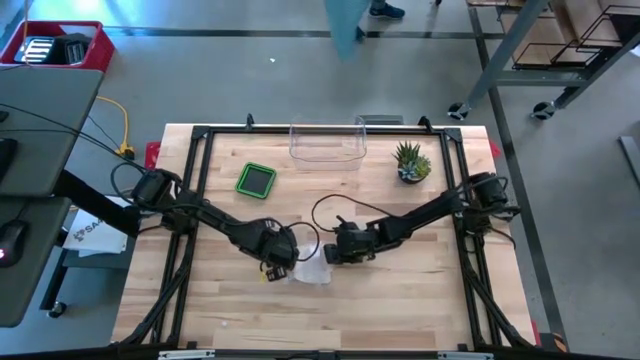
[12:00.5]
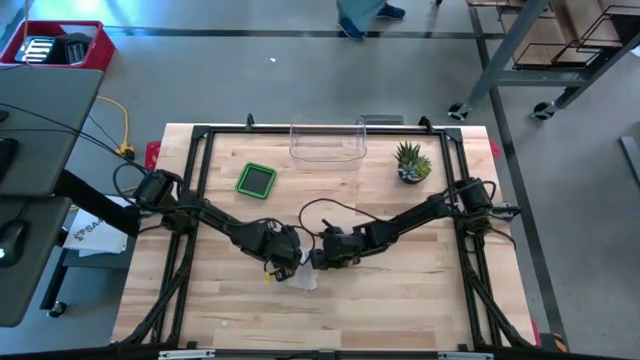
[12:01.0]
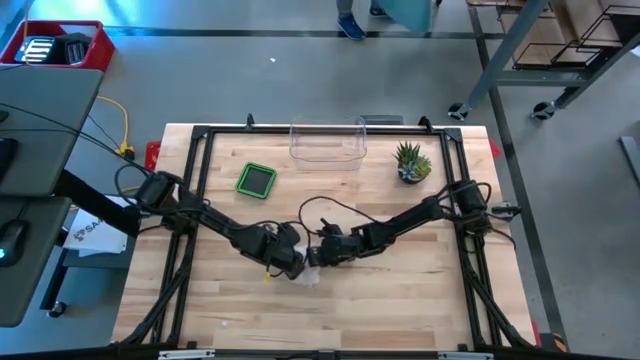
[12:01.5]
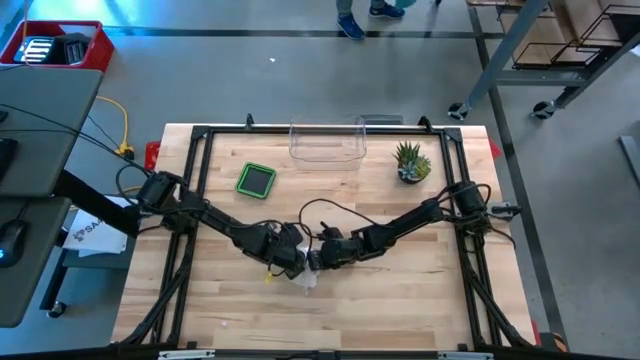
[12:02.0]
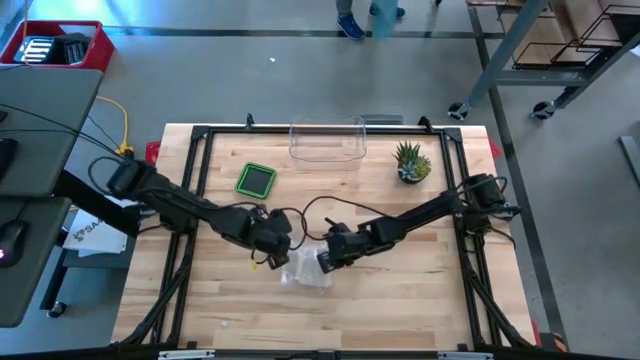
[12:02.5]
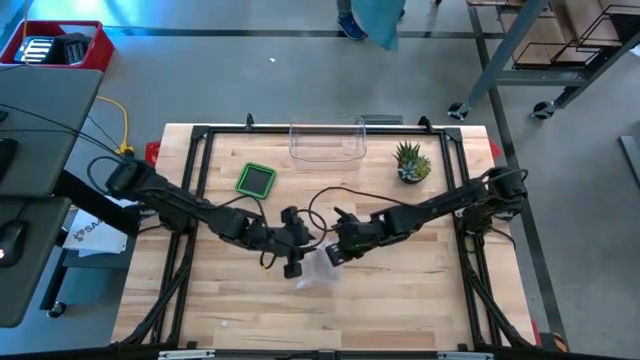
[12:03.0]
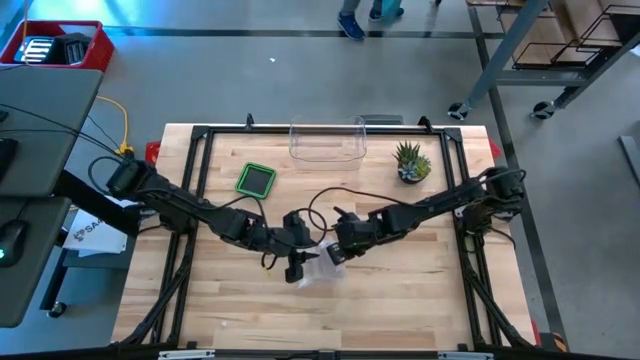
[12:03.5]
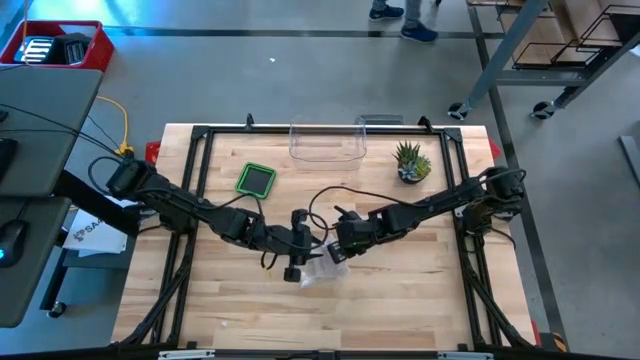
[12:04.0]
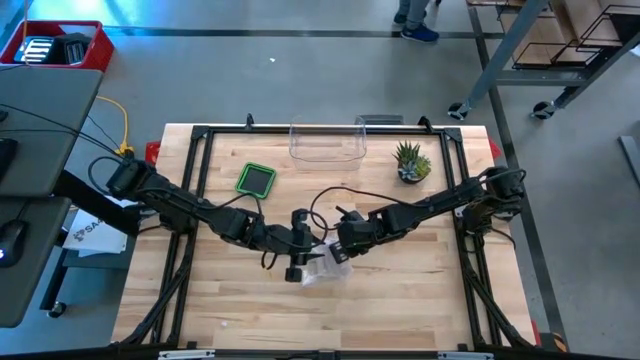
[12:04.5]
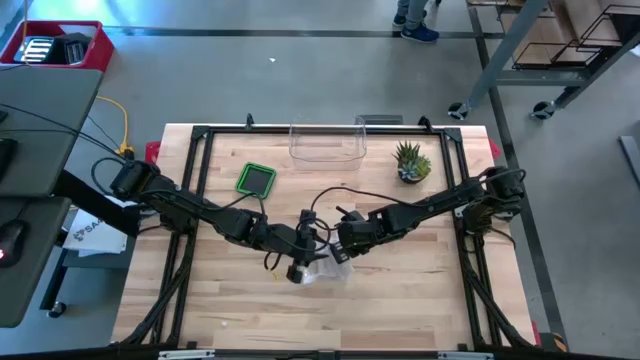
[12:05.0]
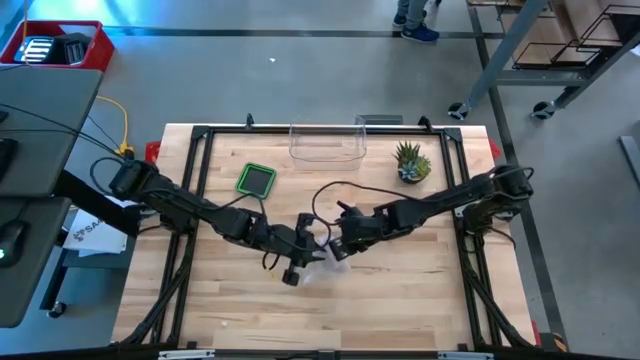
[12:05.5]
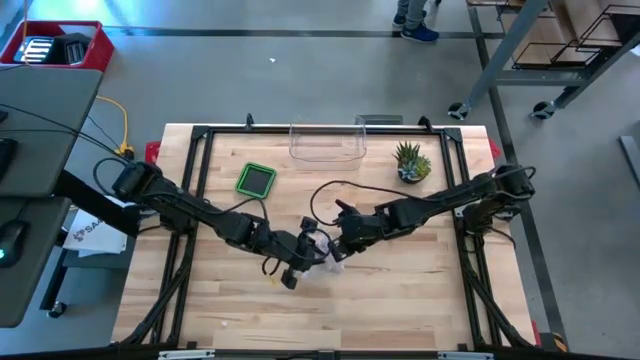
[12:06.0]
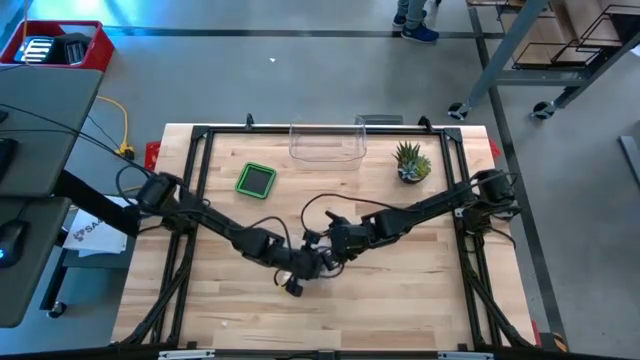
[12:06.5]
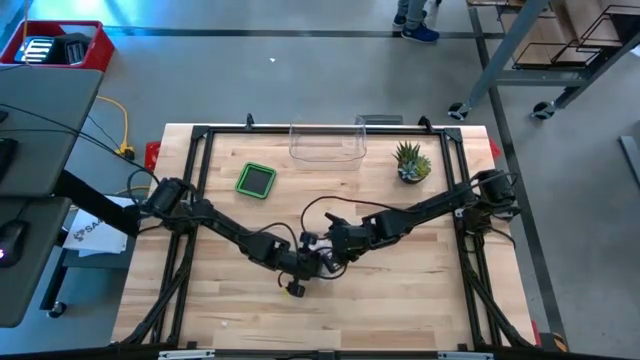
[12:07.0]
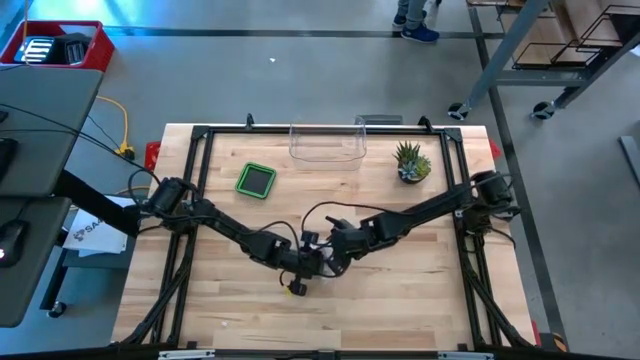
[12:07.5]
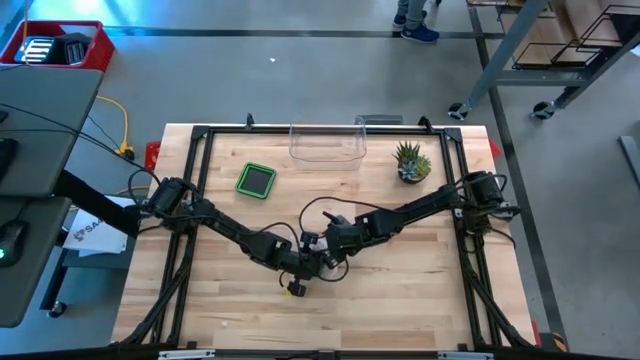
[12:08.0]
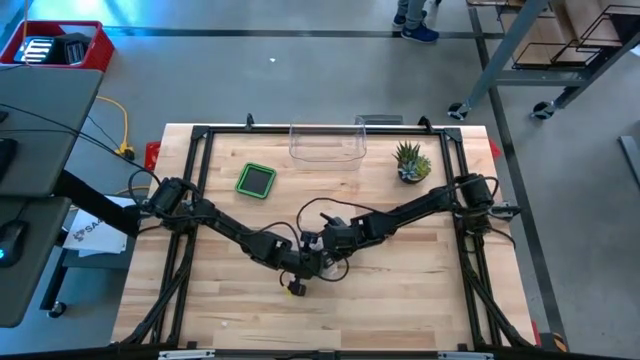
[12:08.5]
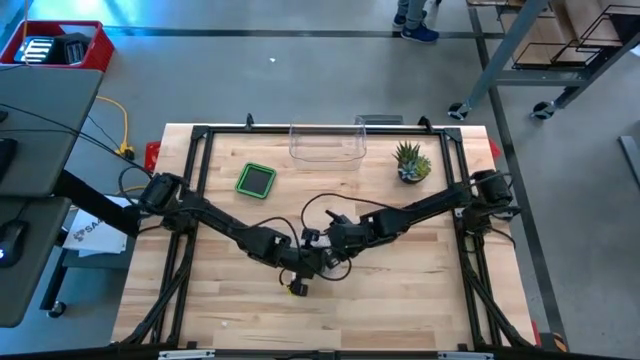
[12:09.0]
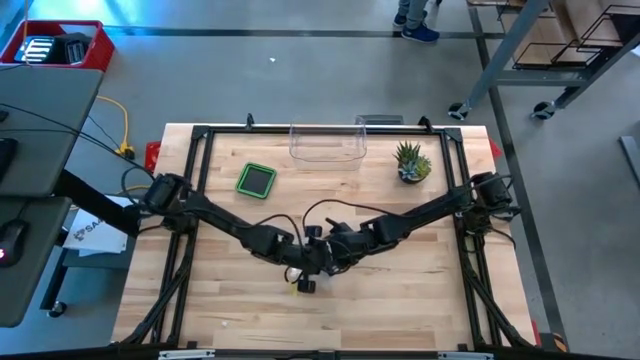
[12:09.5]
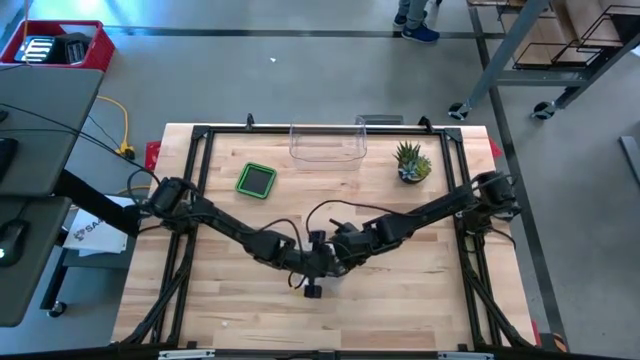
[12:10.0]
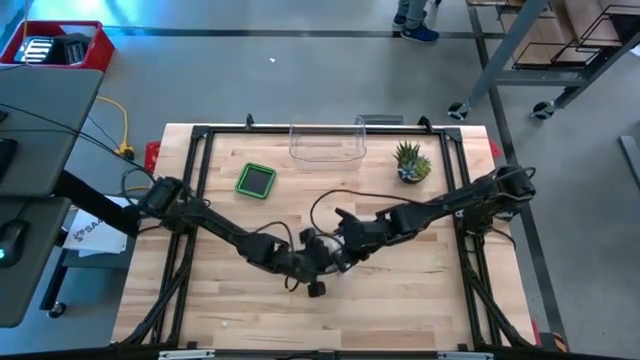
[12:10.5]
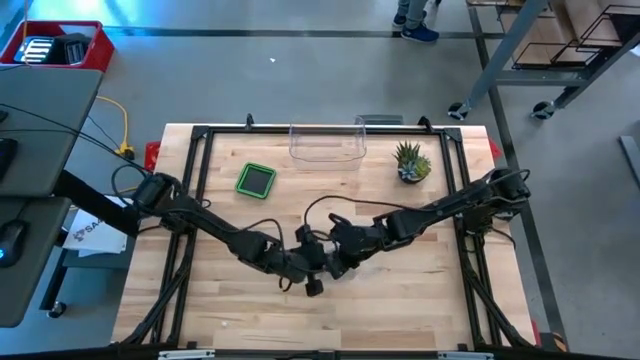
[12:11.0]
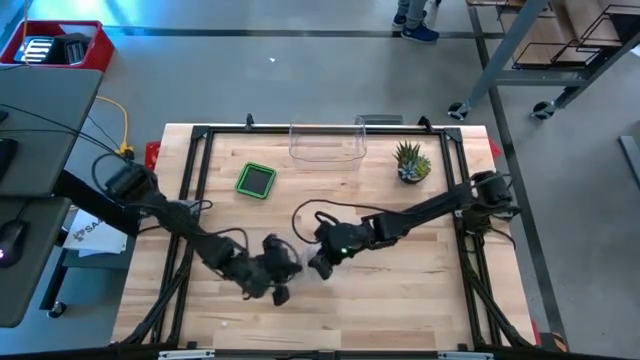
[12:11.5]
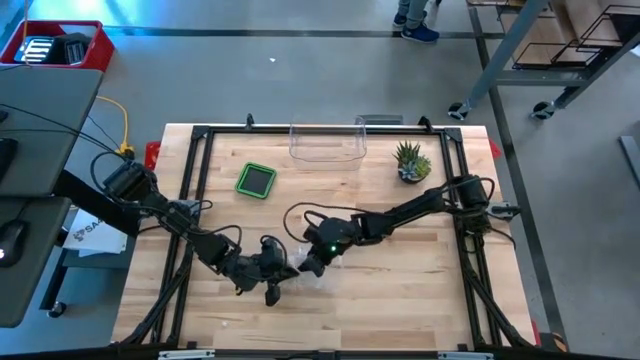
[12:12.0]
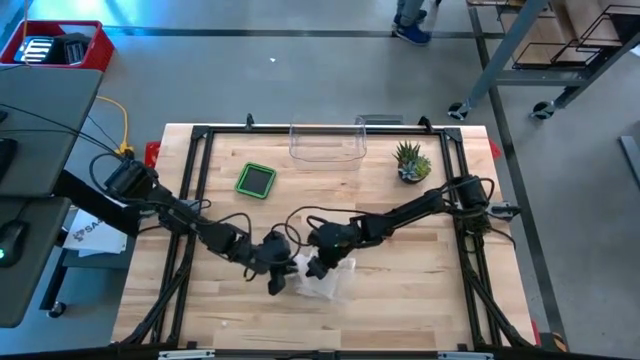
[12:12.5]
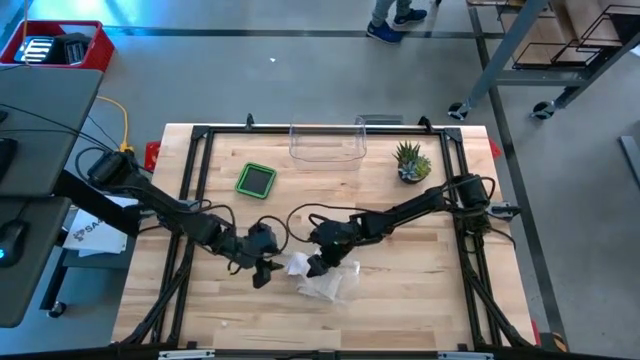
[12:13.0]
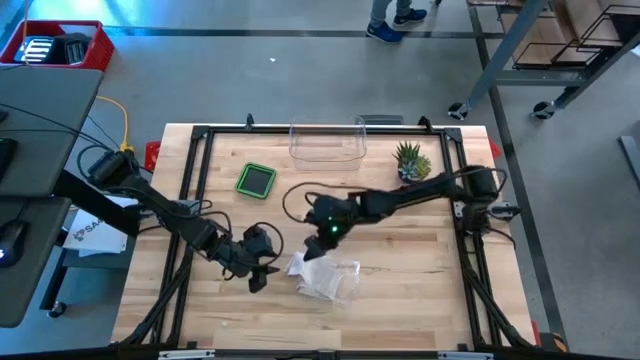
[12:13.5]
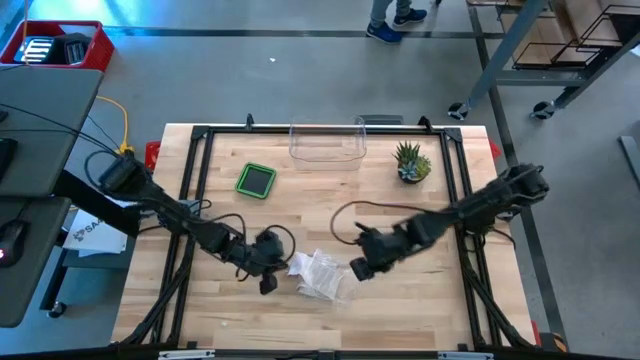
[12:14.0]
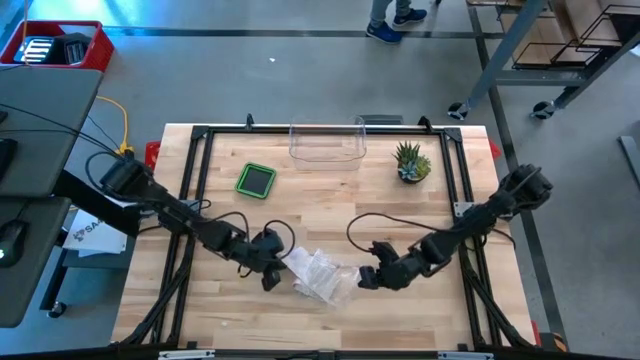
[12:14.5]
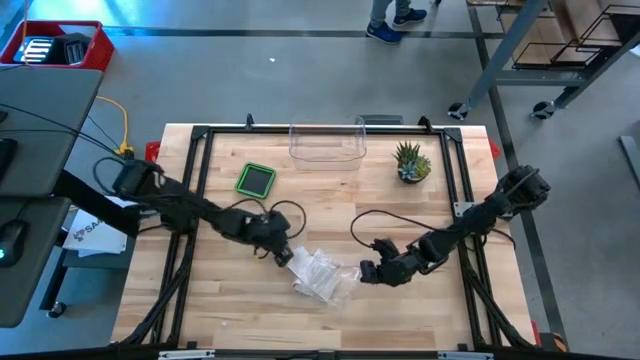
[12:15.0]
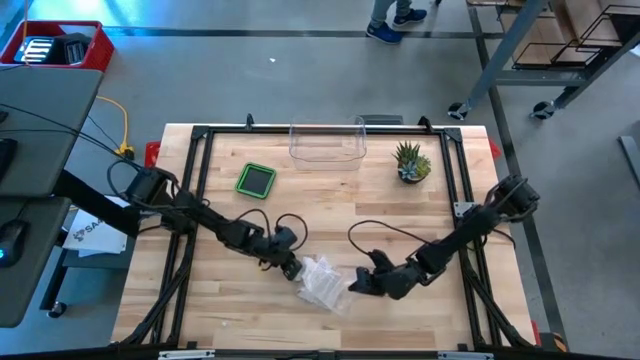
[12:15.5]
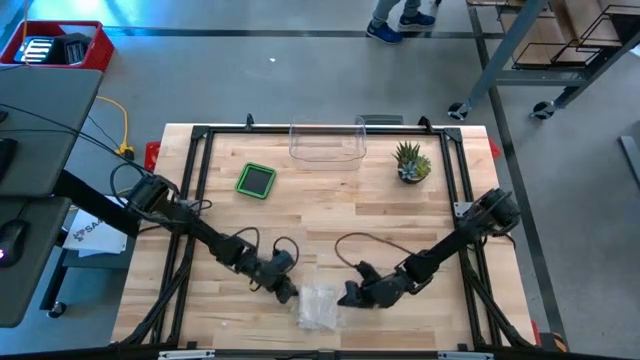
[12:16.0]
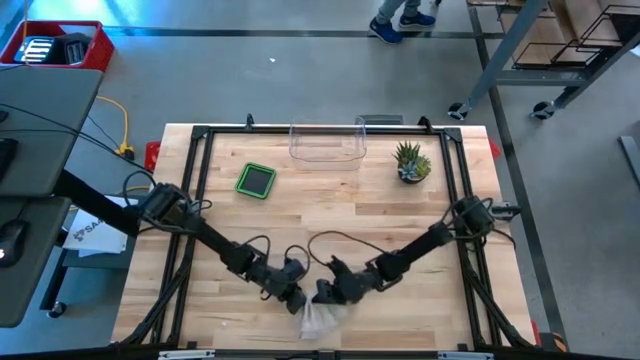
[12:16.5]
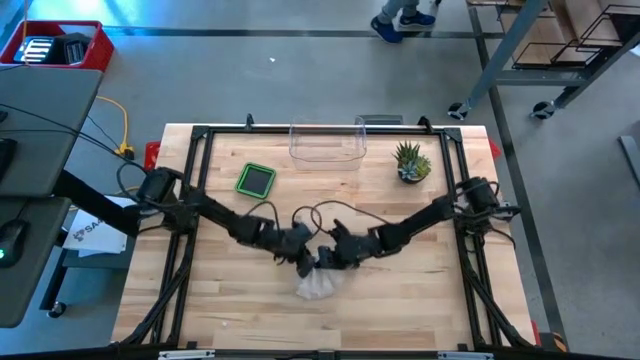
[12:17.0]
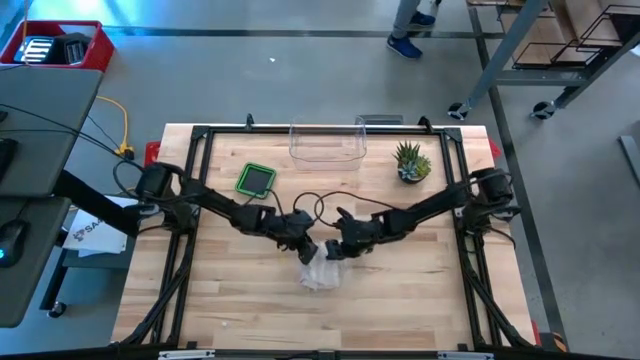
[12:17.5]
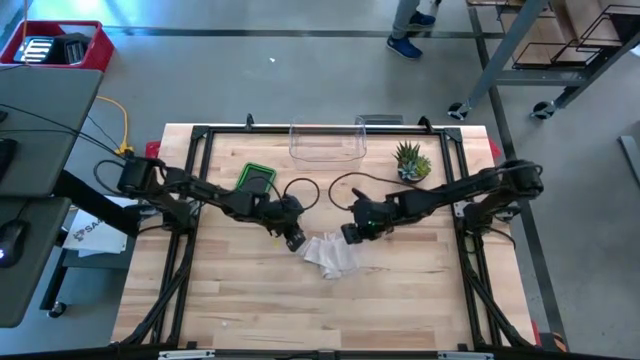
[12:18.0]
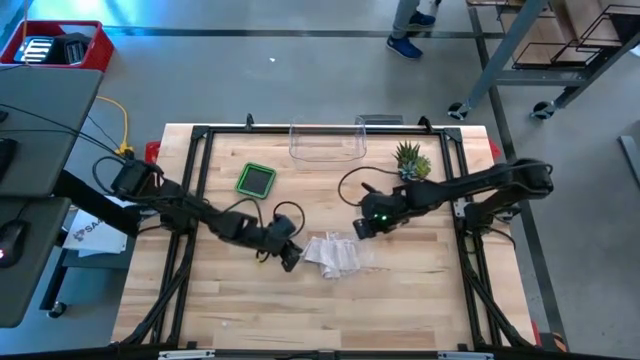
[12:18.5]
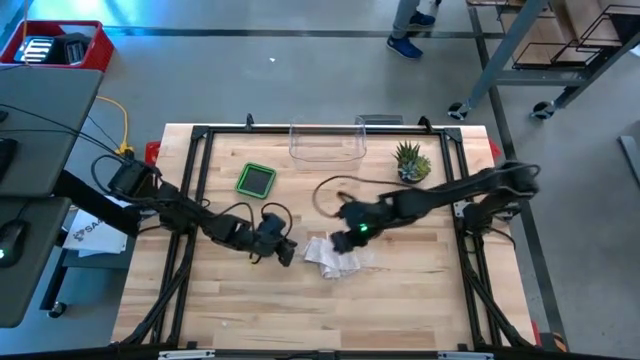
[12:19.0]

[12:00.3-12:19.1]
Task: Roll bandage
Put the rolled bandage into the transparent zip bag
